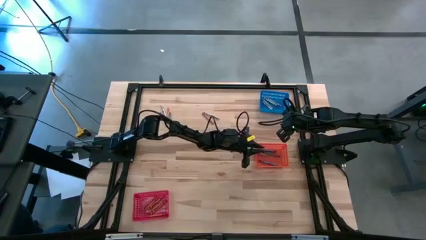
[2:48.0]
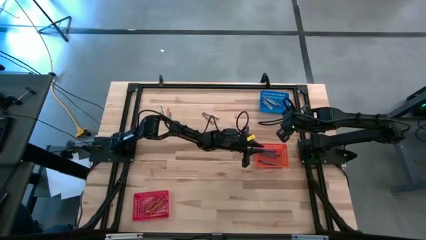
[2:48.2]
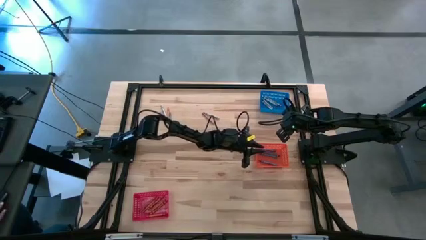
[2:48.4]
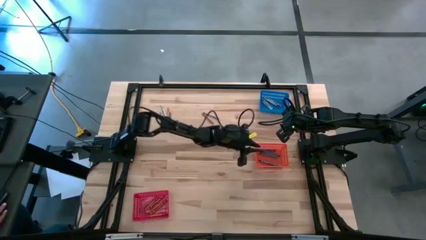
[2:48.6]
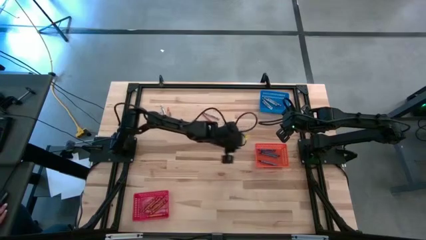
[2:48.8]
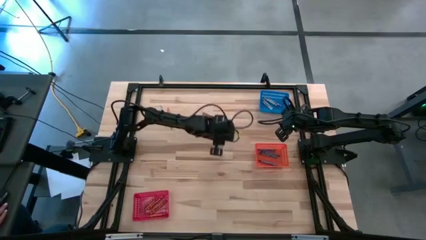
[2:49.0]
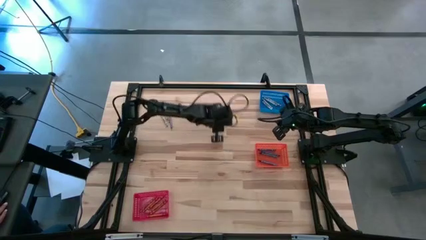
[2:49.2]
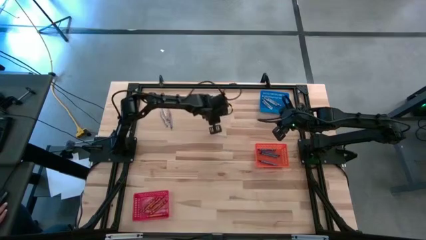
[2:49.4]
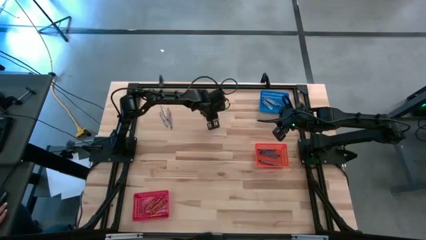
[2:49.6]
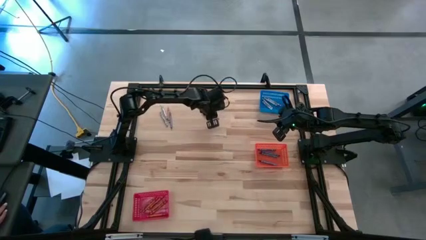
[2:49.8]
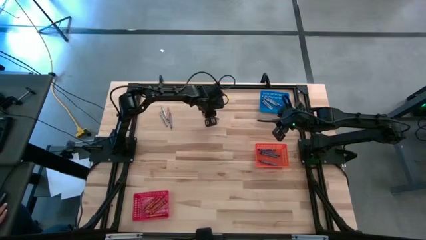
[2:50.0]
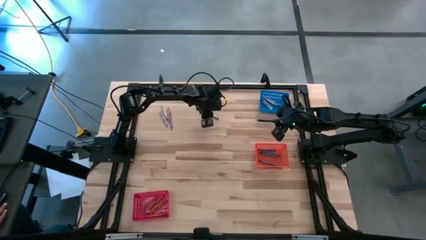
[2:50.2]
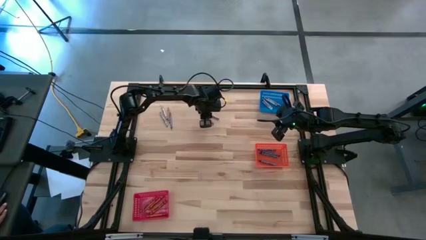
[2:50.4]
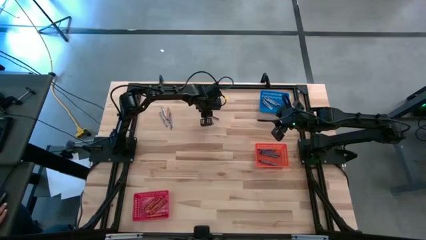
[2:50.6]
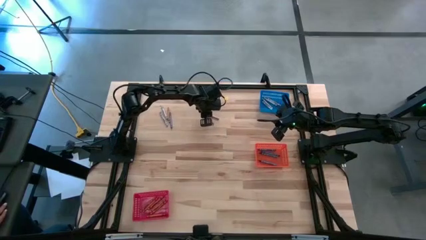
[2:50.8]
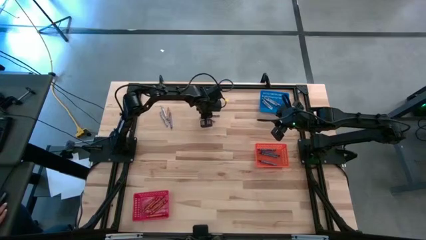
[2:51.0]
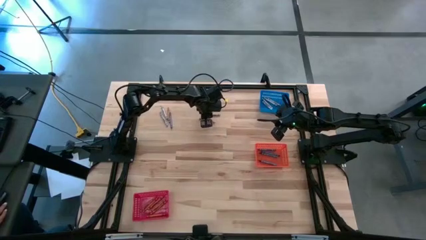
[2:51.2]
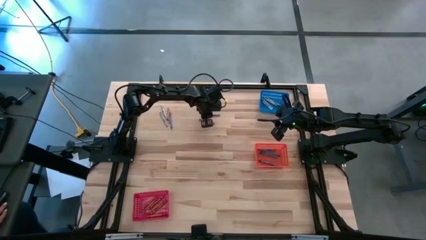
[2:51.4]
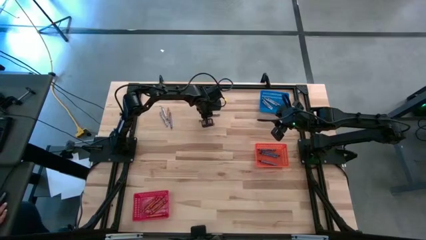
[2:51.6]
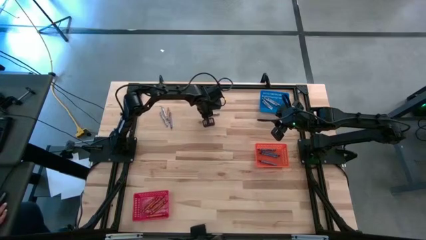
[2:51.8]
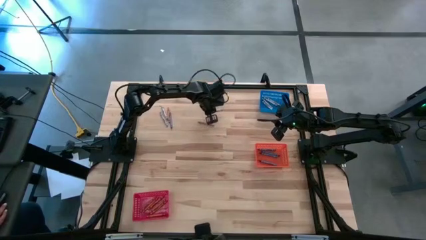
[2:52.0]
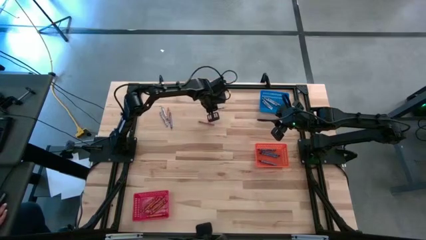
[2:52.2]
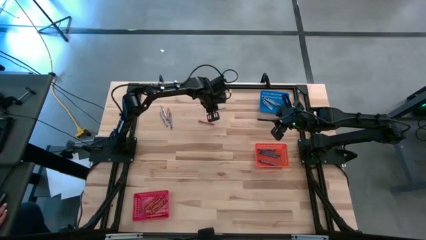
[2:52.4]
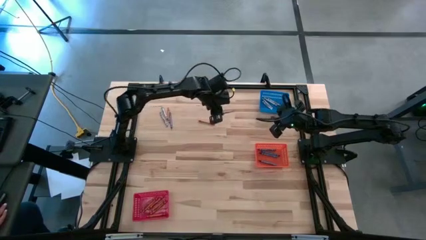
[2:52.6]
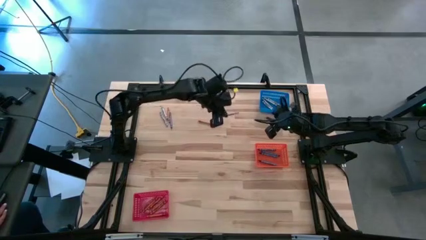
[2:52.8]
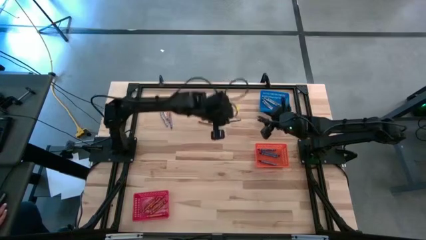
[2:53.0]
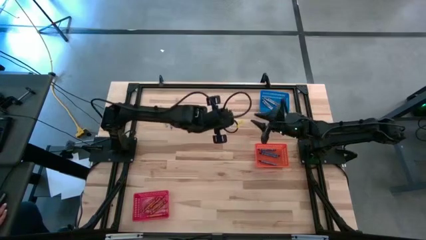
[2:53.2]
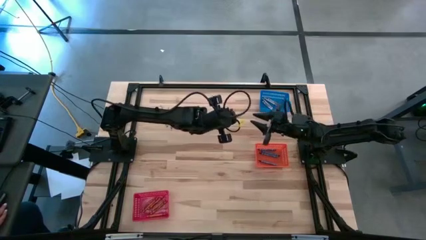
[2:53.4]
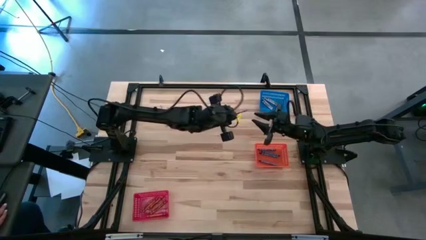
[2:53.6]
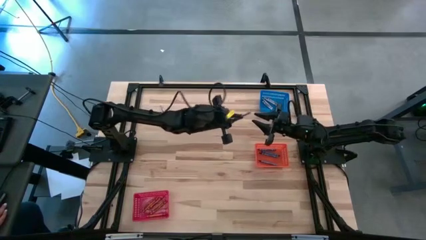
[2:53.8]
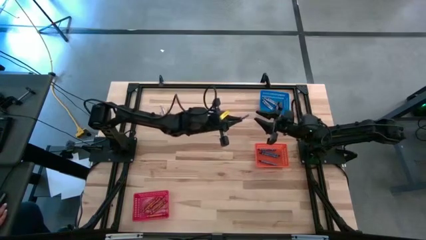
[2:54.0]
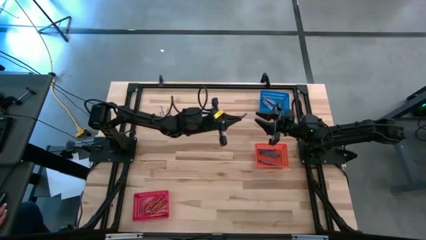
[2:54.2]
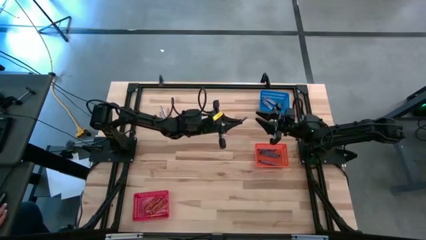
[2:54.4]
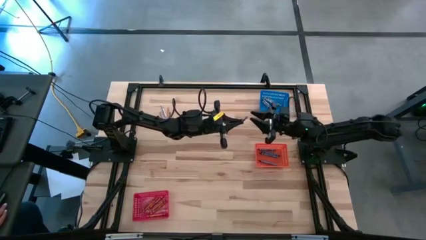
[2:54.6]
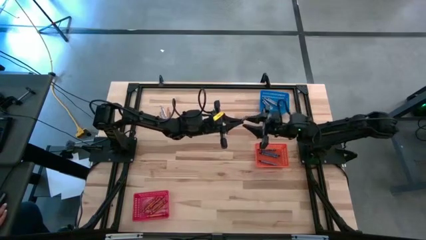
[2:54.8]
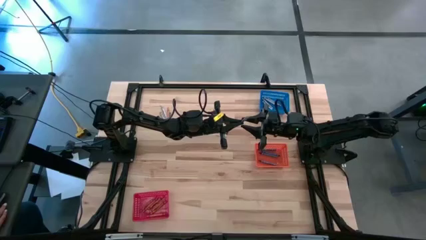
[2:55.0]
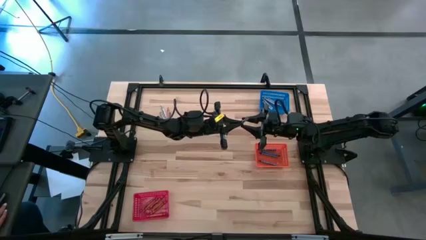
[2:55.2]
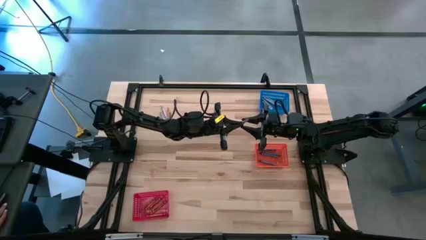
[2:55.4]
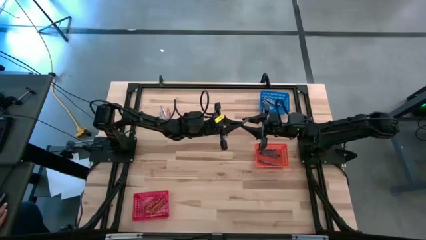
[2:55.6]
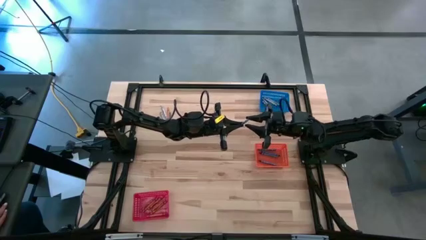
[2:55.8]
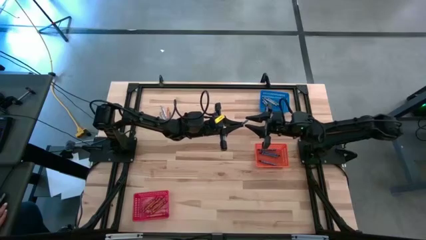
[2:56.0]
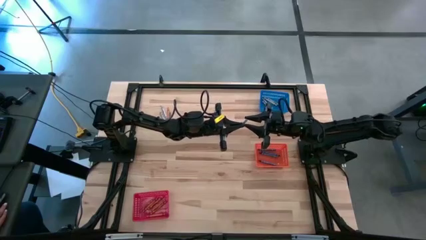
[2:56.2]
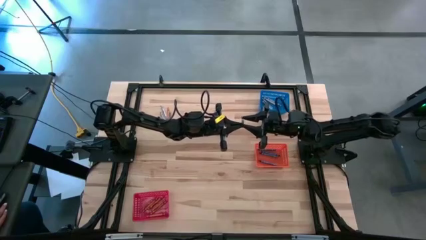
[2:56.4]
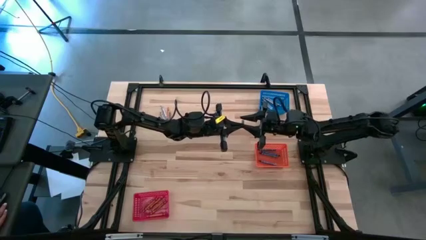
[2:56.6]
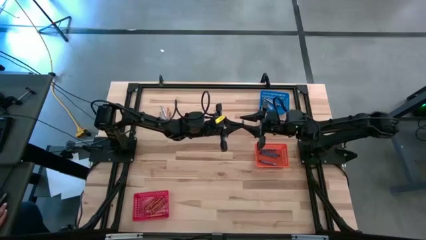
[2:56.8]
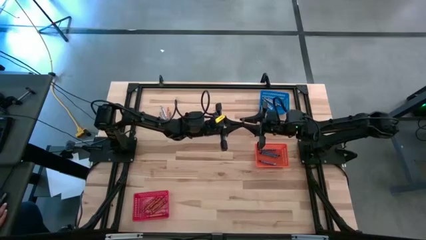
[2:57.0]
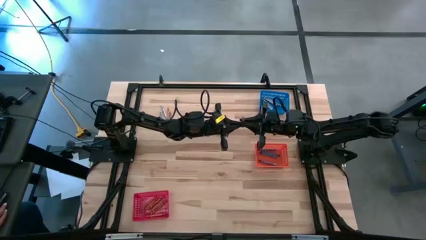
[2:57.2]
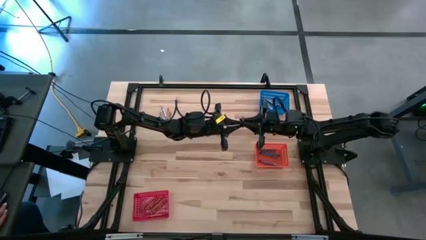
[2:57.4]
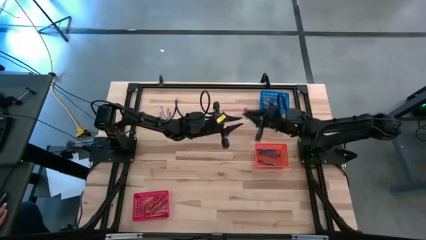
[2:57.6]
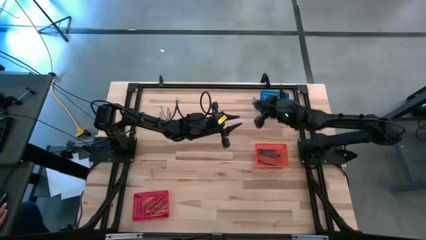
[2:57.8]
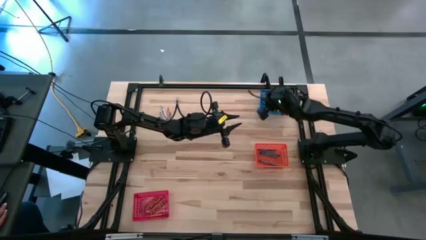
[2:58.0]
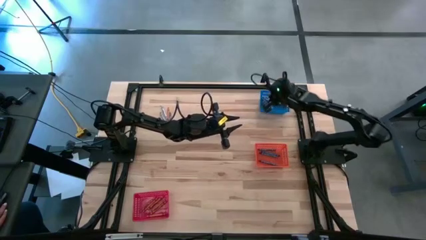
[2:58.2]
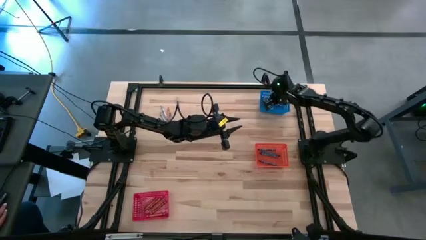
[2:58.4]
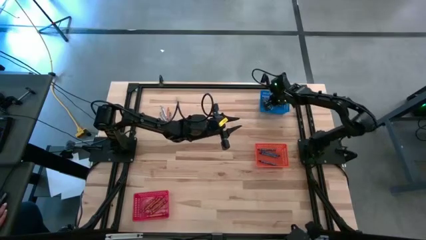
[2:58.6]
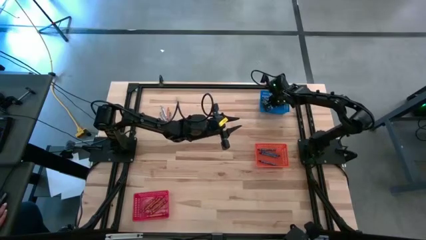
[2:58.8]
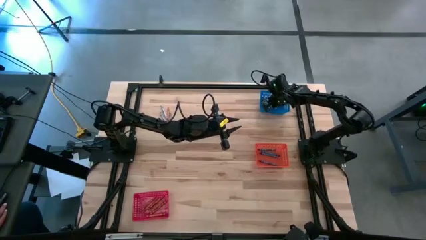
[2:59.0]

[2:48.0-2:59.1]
Task: Sort crayons
Put the gray crayon into the blue bin

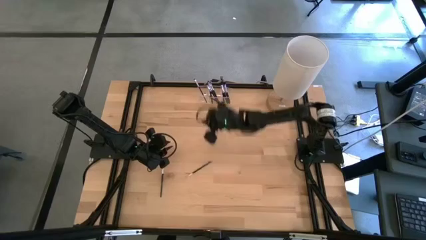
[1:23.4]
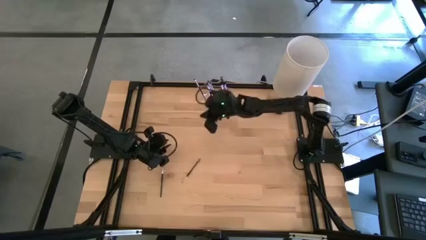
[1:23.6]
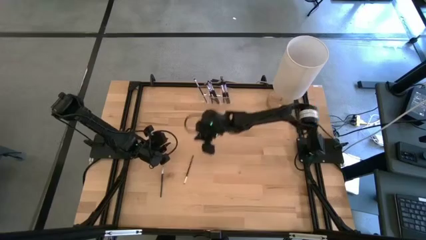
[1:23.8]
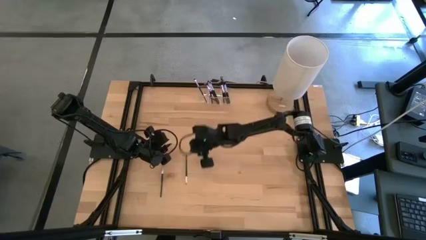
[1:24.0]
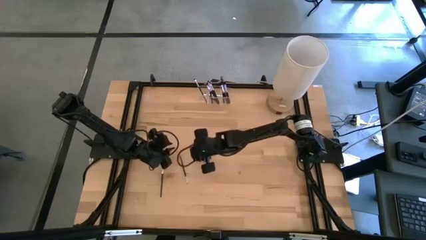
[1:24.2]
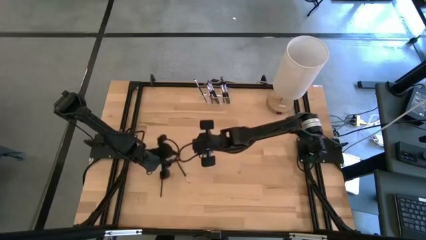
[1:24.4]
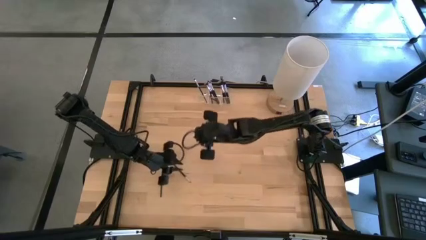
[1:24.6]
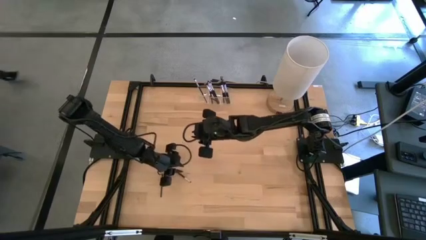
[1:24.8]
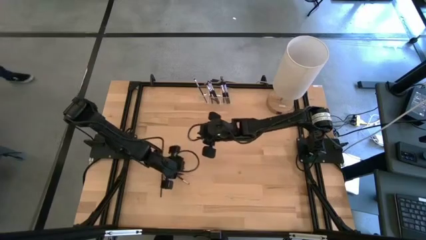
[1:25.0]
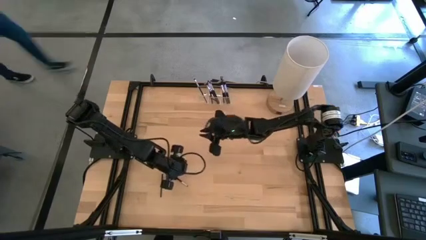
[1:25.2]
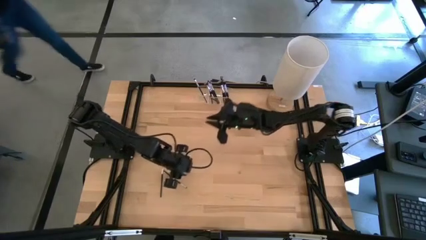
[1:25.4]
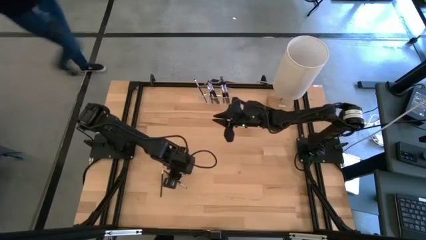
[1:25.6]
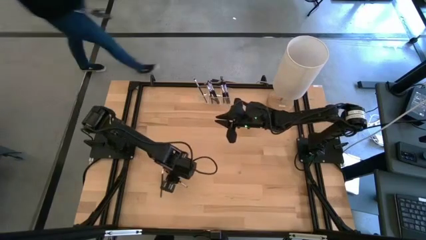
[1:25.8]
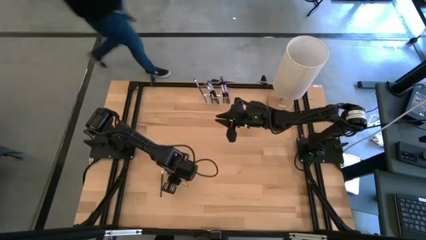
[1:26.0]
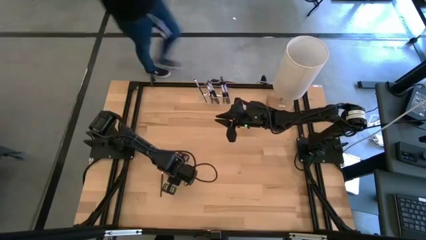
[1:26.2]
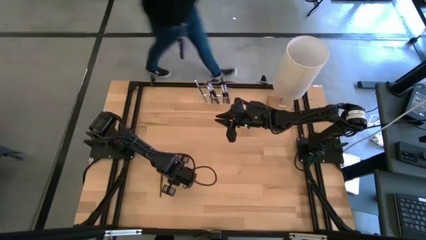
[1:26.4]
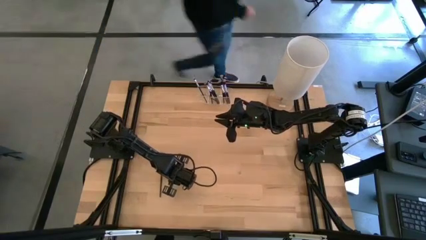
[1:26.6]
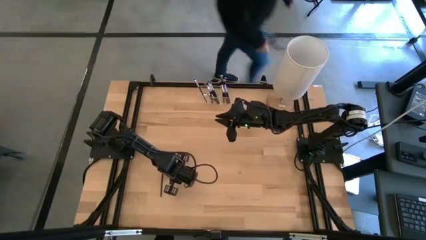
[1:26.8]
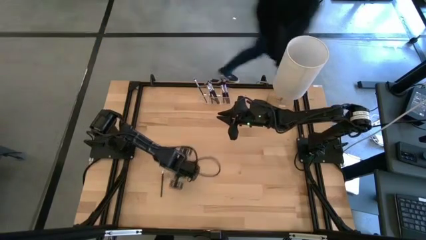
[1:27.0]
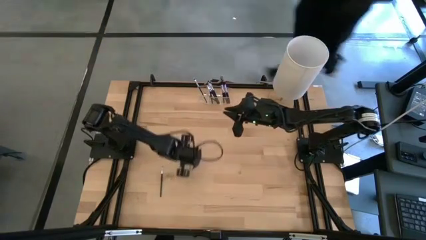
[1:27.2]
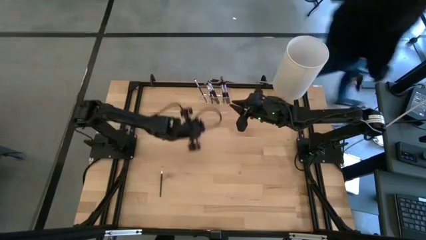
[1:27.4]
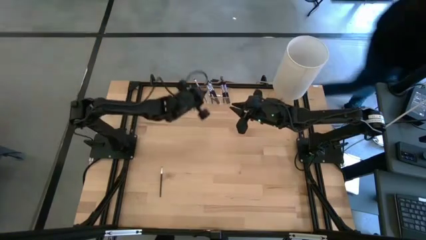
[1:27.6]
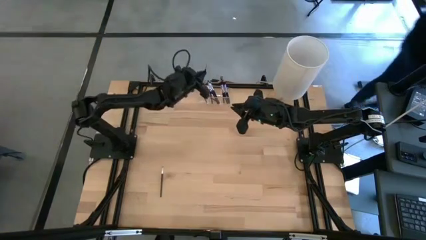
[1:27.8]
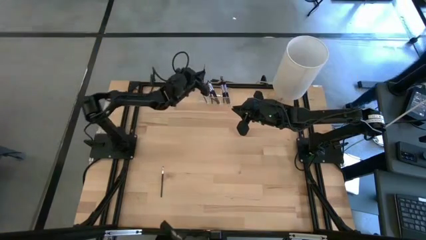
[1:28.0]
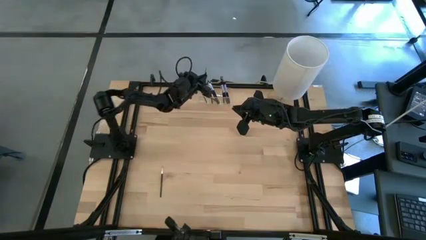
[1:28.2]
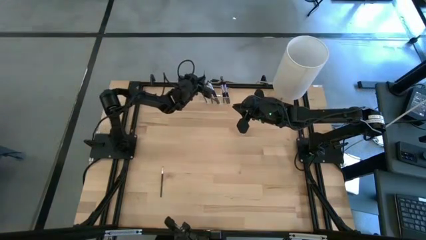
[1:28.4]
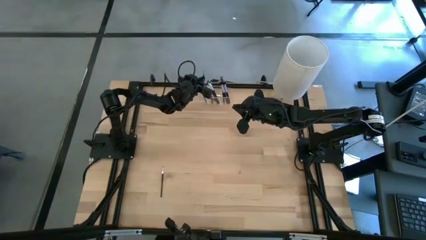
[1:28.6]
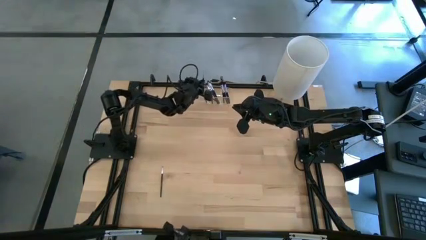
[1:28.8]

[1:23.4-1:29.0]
Task: Put items in baskets/containers
Put the black eyeshadow brush into the transparent organizer
